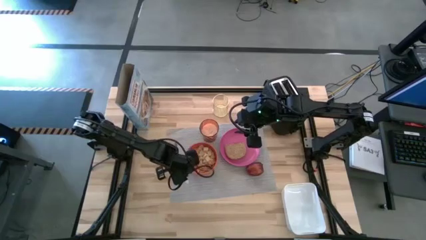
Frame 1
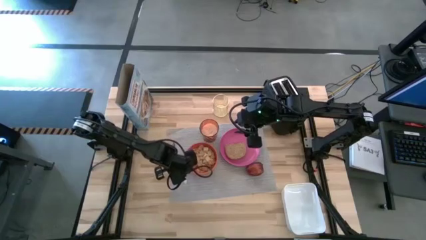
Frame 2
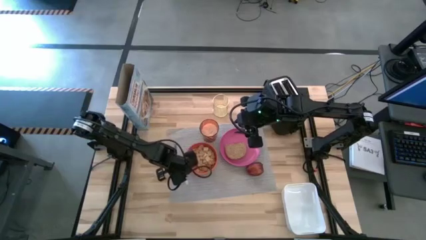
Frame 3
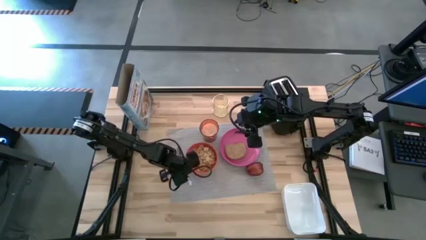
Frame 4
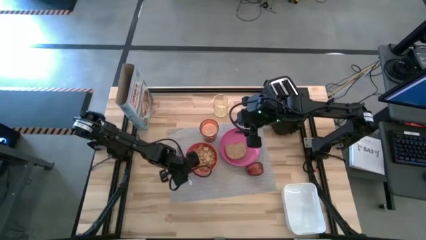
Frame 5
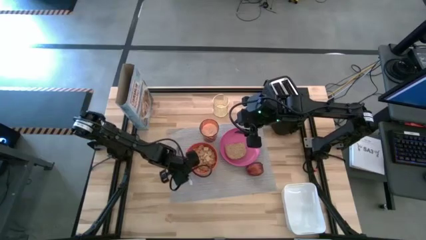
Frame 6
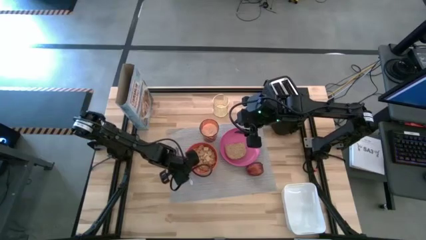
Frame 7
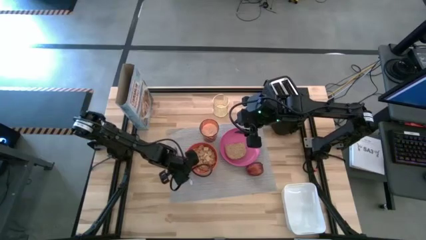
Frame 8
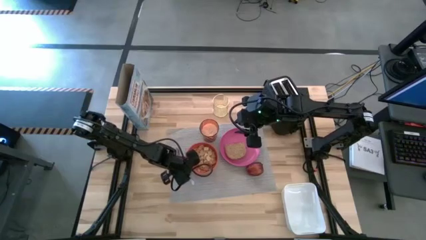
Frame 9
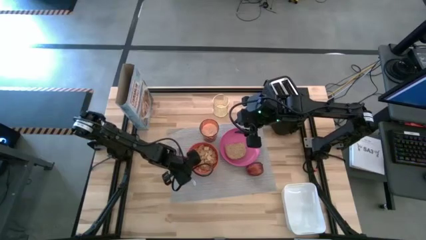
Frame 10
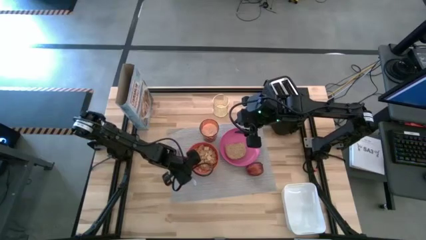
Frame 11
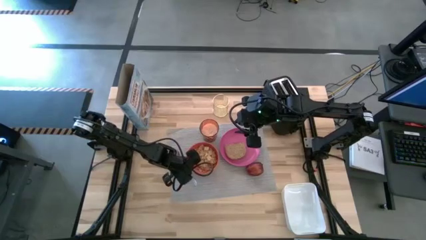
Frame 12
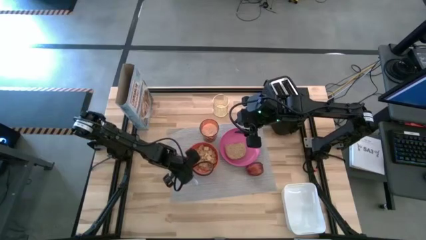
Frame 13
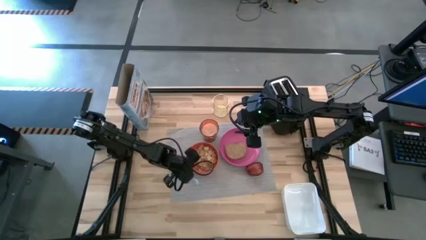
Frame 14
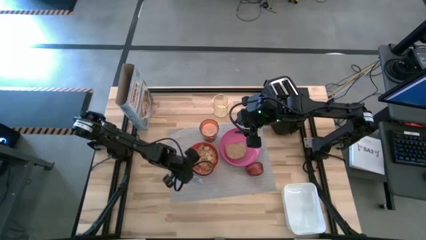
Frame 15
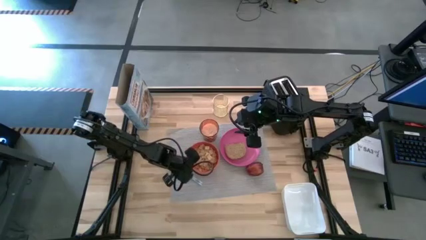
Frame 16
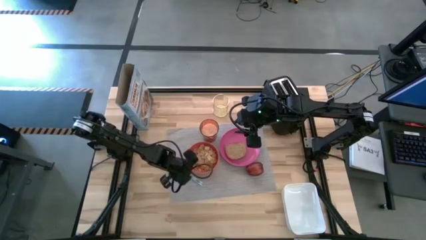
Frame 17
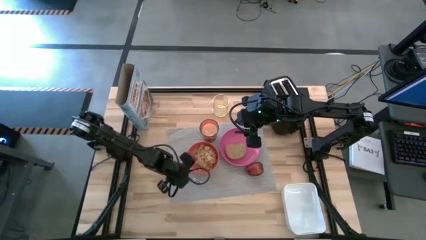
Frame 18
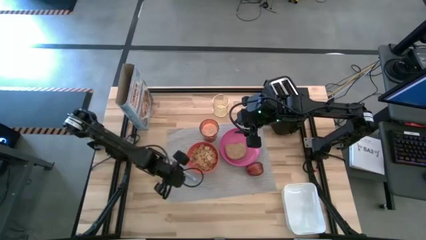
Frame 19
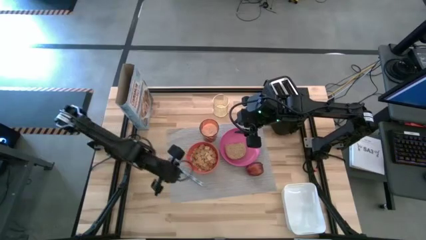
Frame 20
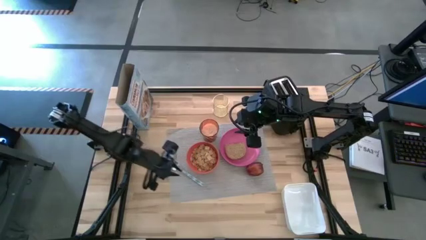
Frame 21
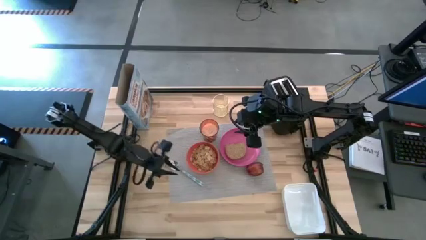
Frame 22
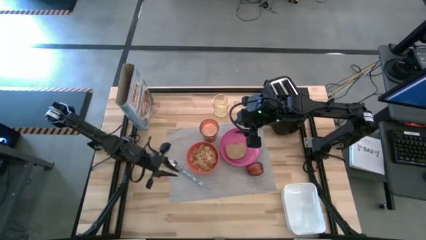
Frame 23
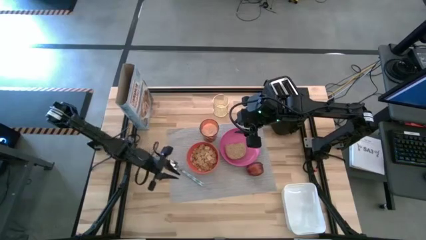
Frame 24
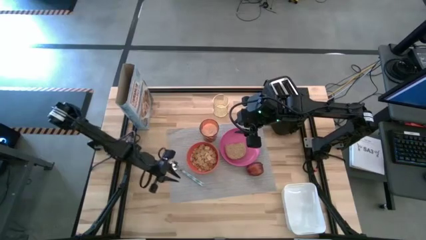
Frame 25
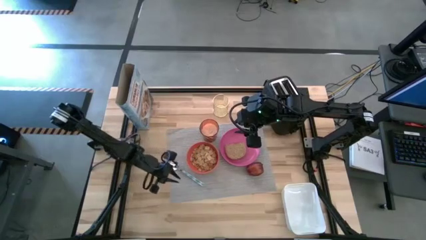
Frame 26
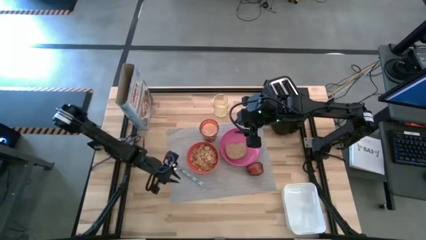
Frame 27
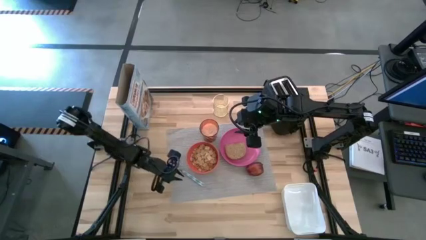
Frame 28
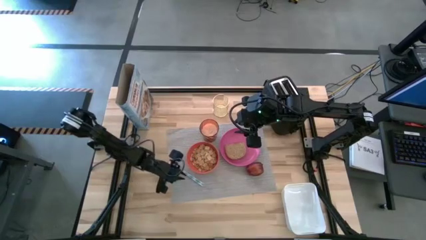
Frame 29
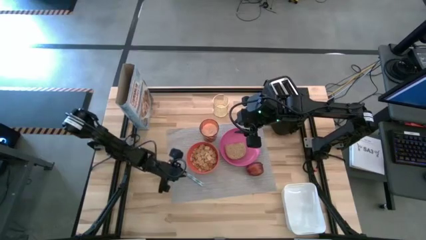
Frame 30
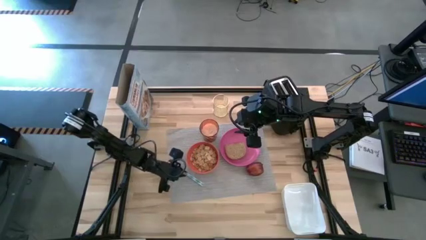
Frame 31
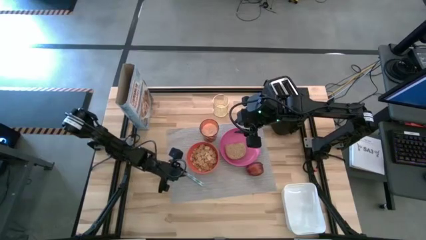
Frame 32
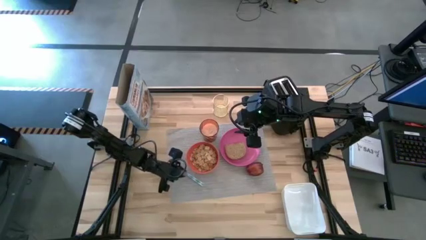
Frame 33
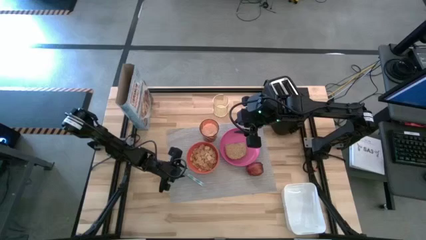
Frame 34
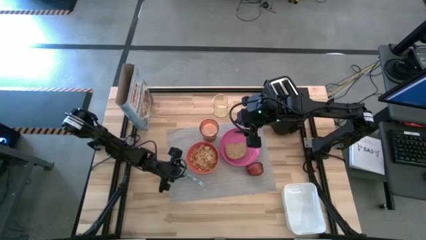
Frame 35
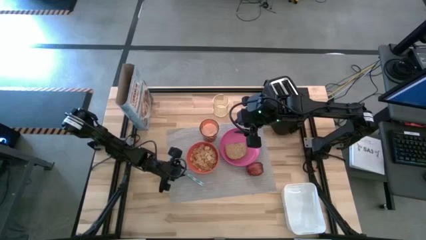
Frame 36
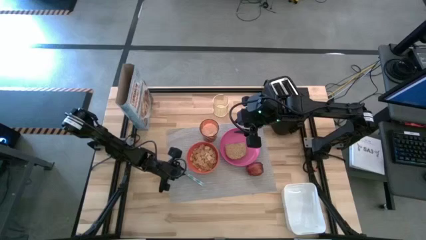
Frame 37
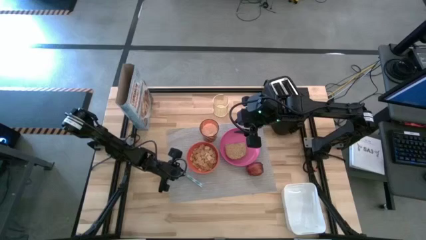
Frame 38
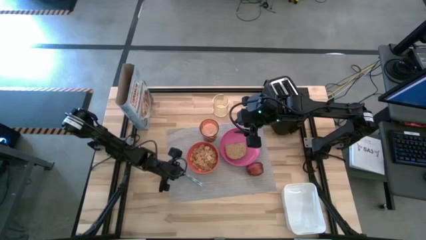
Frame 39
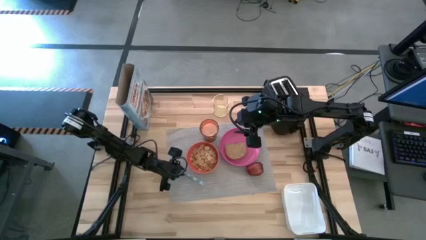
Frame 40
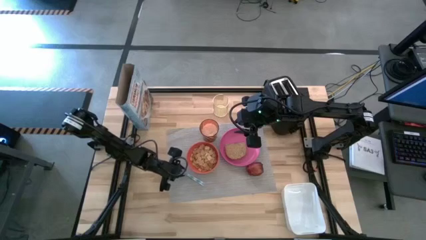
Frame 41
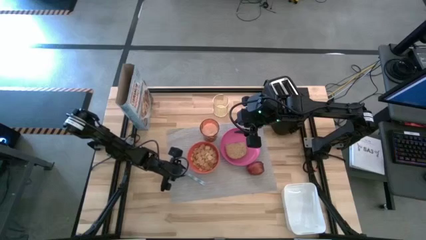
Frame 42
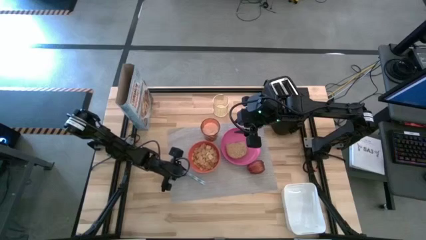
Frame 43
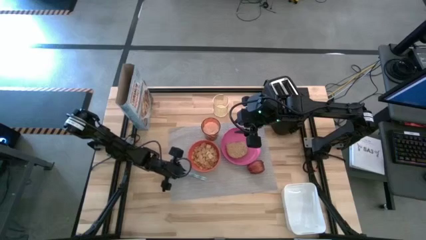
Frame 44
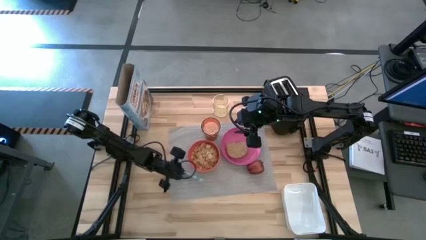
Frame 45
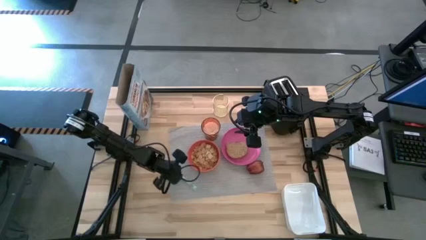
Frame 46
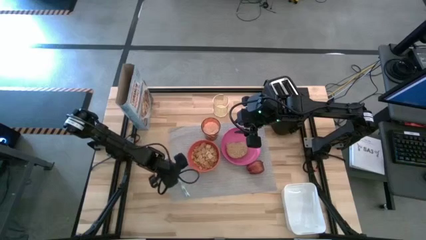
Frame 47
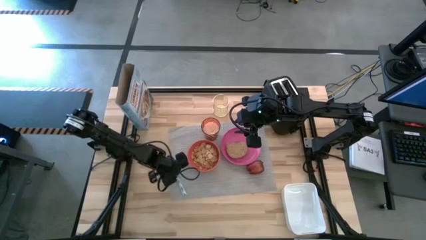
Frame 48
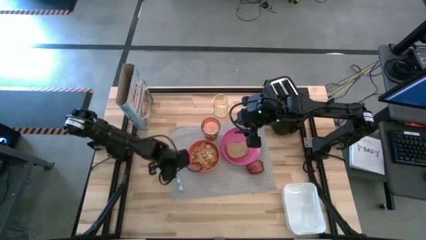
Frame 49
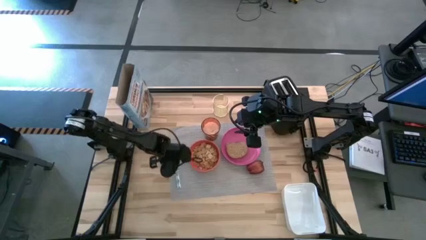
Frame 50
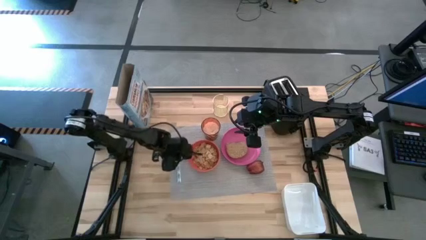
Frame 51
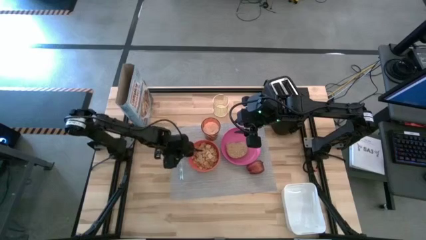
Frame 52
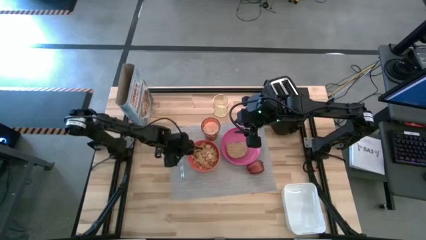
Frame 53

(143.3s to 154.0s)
Task: Arrange a breakfast setting
Put the blue spoon on the gray table mat to the left of the orange bowl
